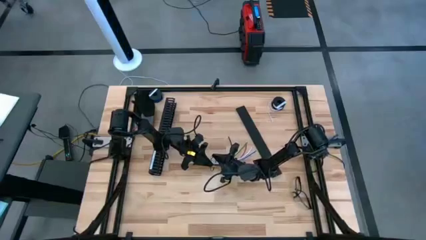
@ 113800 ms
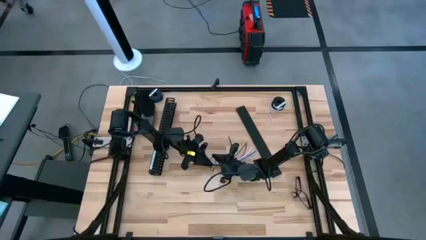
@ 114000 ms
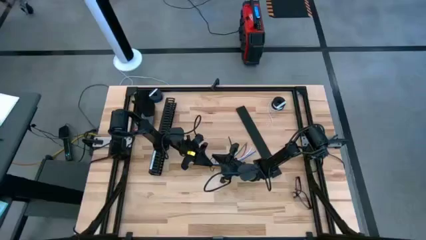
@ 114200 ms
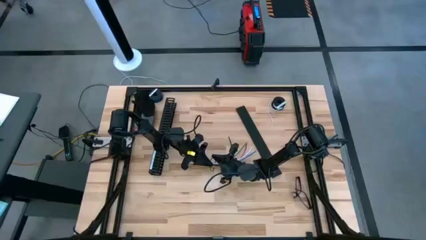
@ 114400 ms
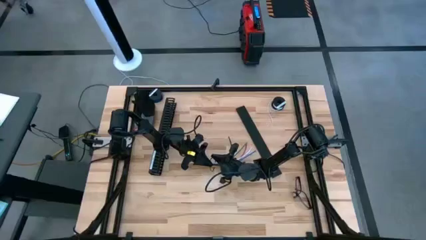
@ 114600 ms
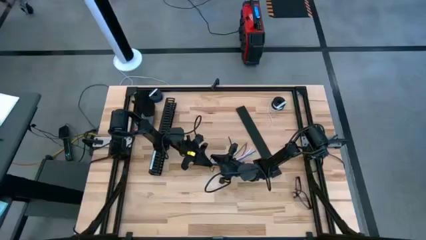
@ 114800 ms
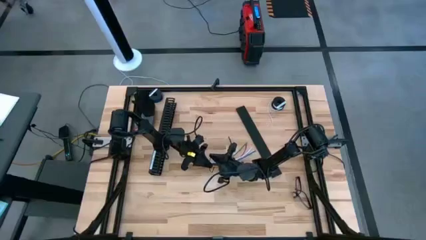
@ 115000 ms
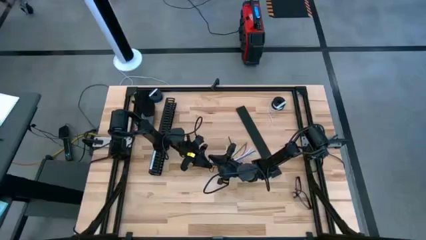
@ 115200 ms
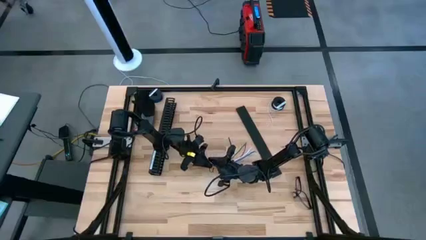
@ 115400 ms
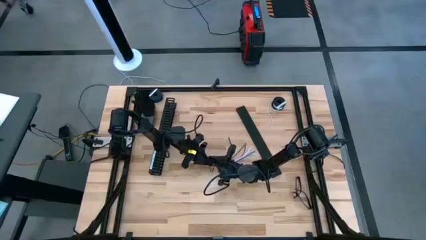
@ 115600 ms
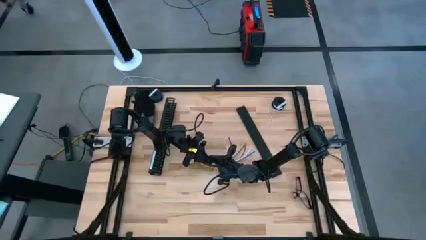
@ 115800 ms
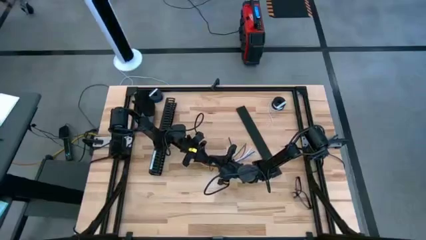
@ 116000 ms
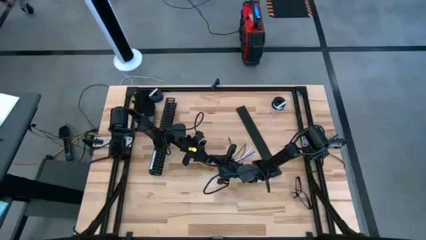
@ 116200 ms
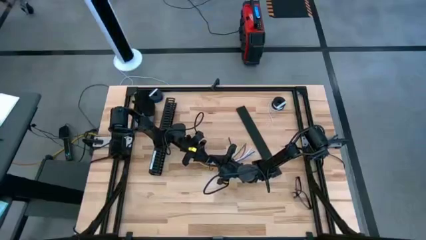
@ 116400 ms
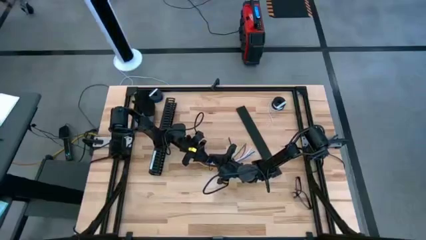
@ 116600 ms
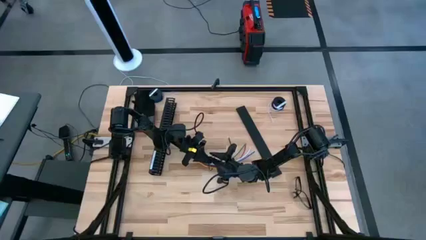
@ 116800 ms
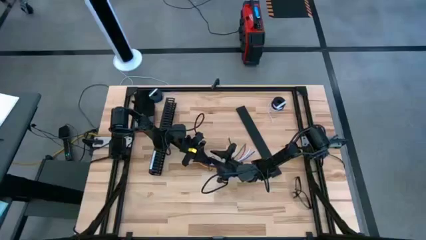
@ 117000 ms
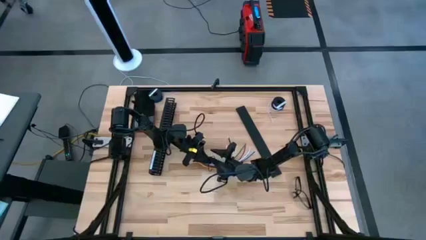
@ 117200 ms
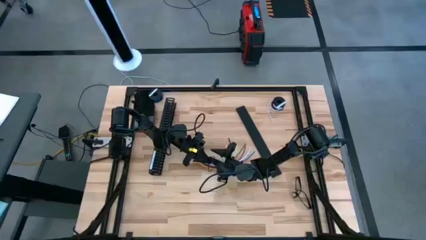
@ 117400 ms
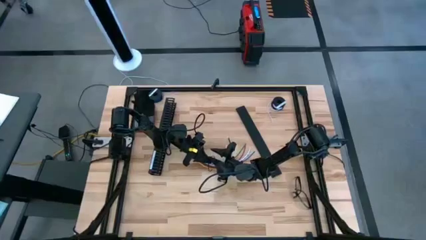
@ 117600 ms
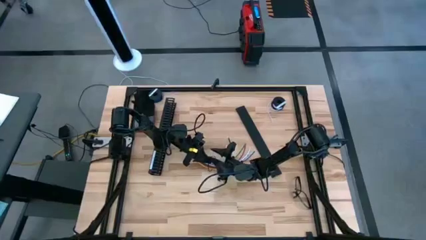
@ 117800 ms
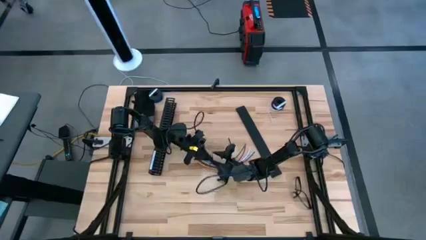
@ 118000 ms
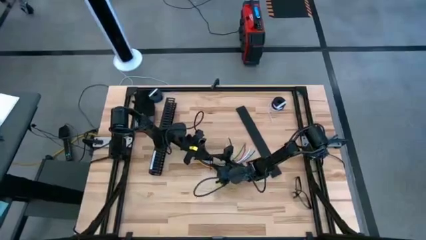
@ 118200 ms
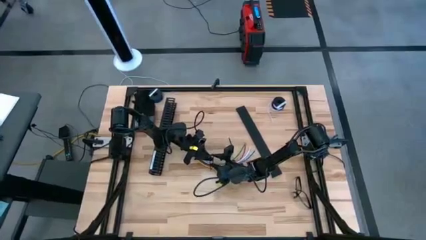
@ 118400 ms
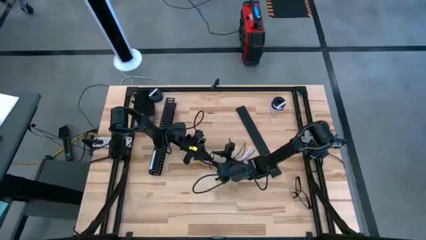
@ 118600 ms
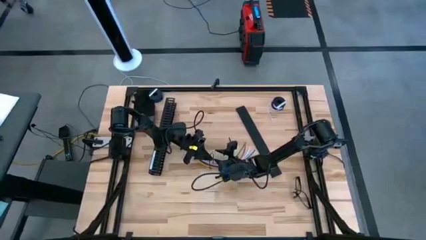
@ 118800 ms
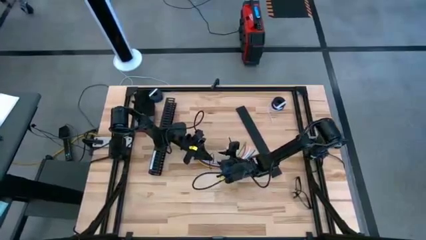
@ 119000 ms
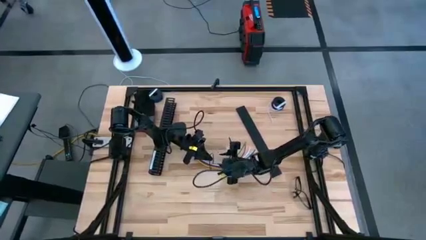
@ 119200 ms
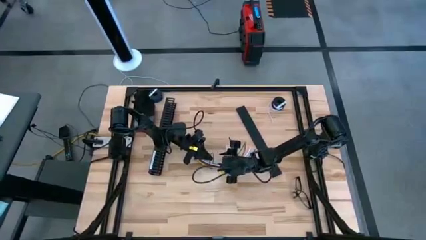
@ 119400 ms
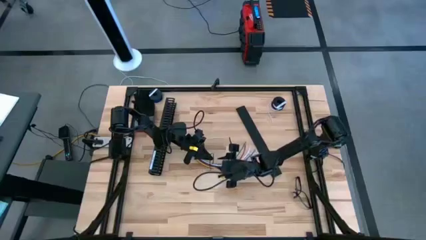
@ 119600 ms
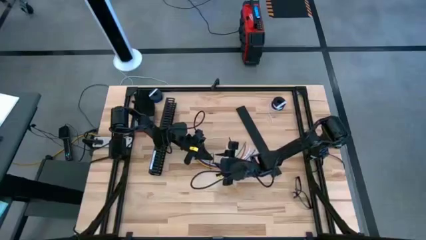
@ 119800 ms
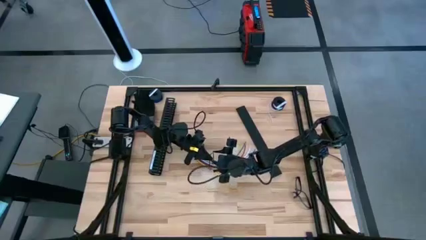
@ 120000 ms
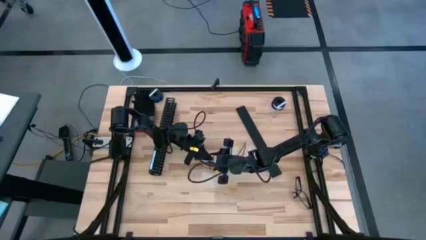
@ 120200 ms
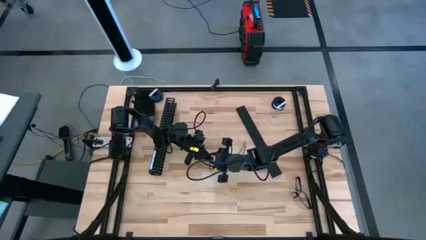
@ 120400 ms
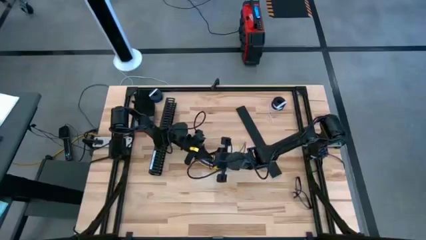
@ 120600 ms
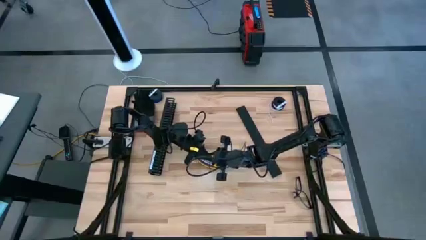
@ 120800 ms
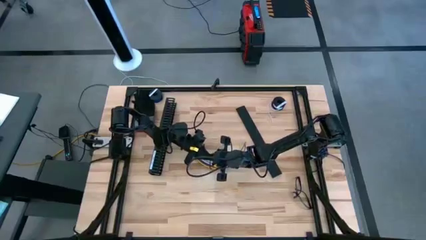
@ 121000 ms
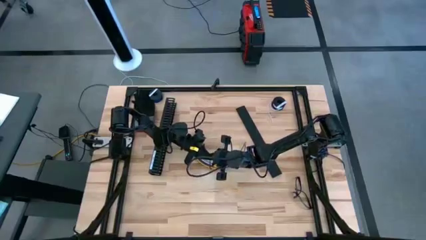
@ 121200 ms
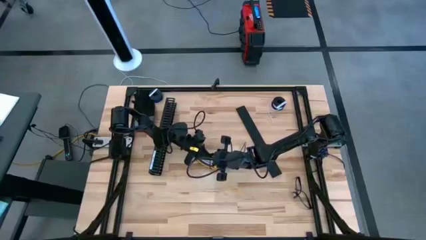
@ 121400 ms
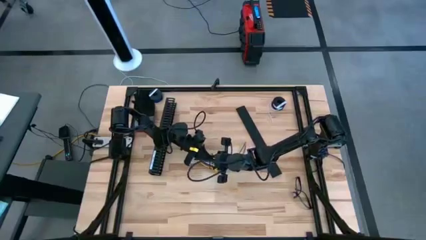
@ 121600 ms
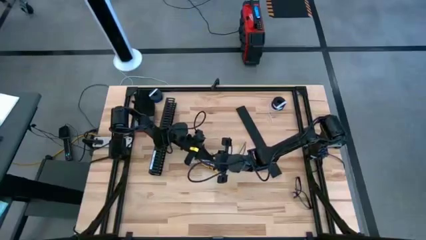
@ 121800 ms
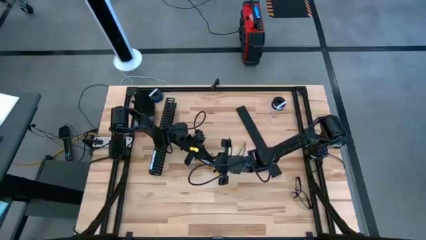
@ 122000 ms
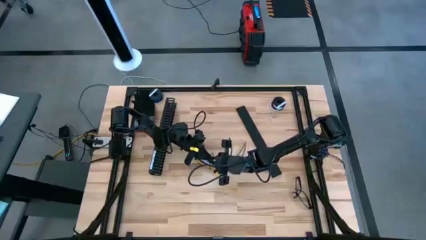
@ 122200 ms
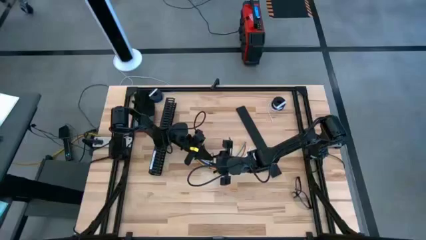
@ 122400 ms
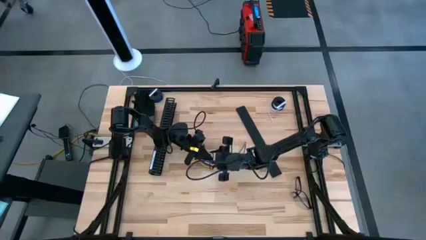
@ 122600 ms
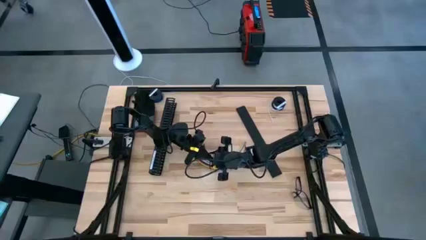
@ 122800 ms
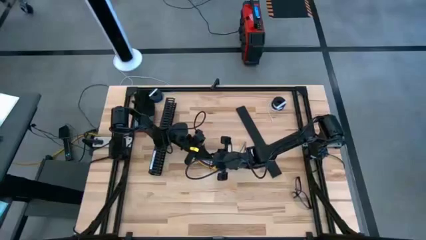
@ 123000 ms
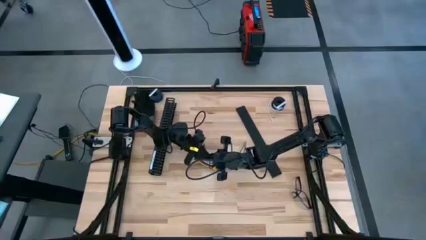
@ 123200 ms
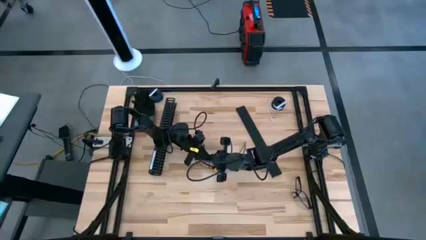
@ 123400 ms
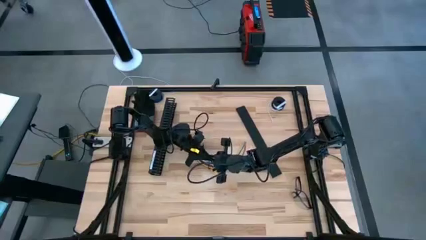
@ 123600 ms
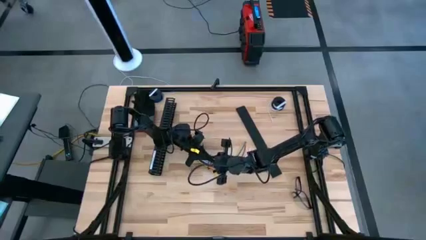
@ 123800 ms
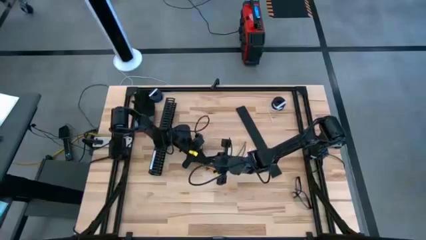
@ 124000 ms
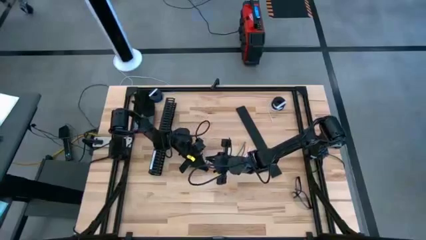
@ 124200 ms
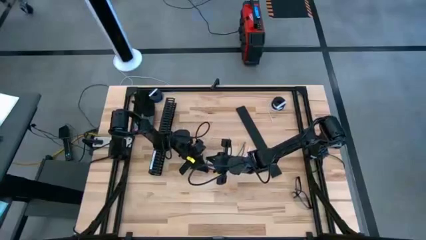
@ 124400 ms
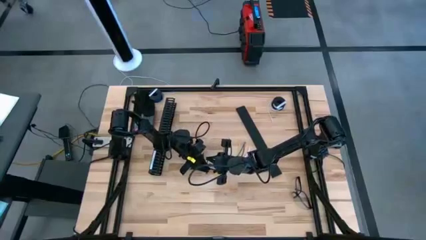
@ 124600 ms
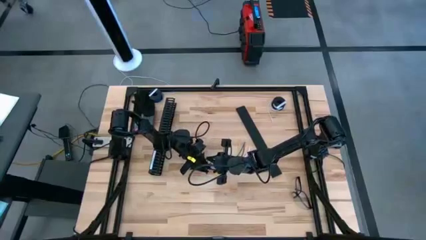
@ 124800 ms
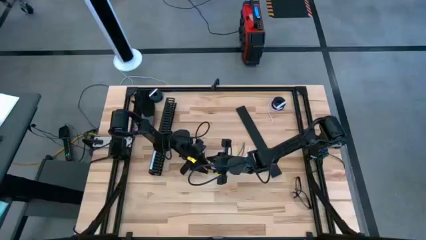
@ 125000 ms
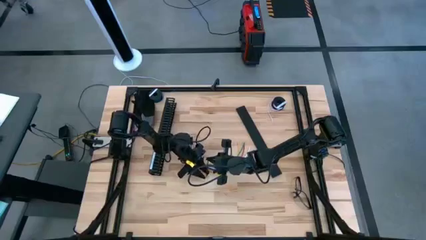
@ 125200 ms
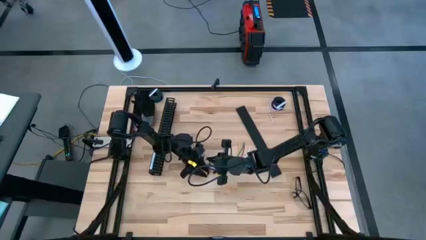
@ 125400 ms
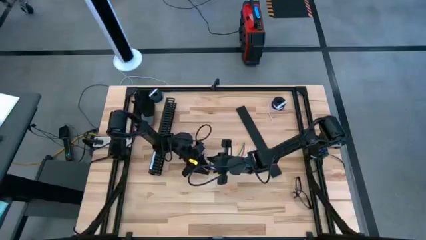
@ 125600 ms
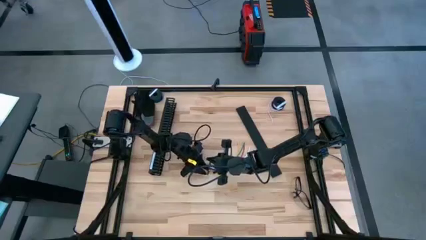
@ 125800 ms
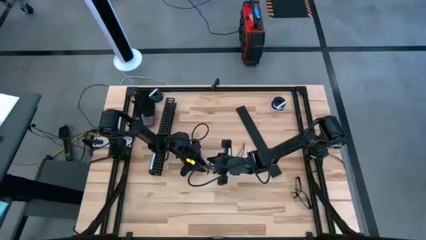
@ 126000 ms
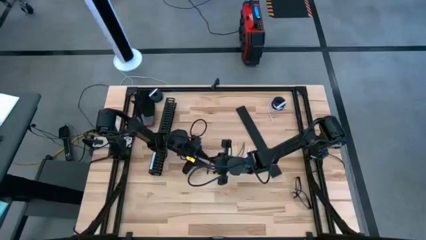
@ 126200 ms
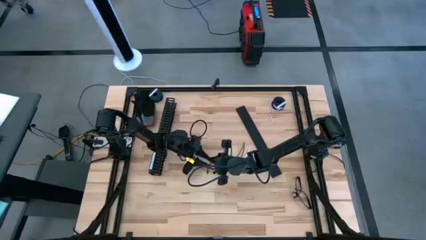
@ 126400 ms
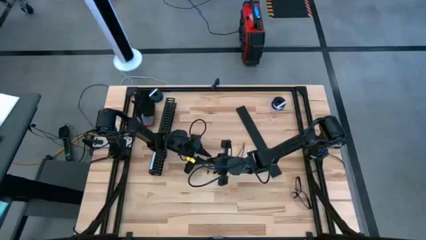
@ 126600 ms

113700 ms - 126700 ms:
Task: Ziptie cables
Wrap the black zip tie on the cable

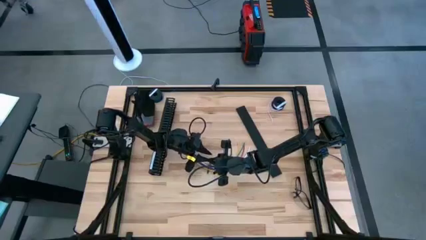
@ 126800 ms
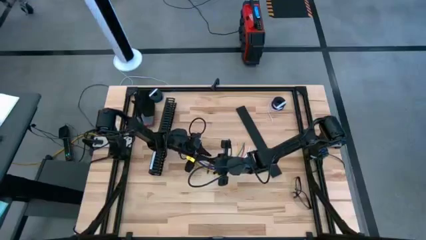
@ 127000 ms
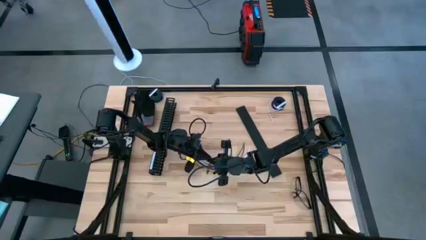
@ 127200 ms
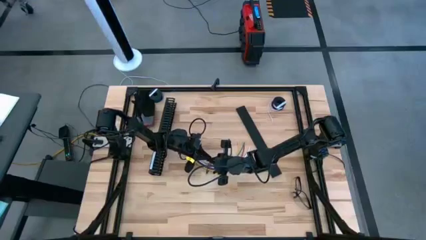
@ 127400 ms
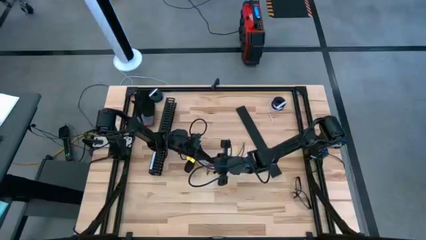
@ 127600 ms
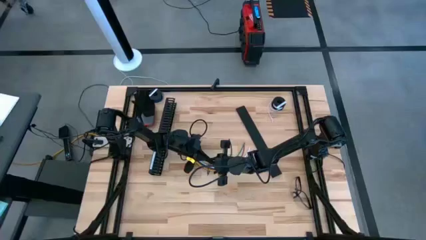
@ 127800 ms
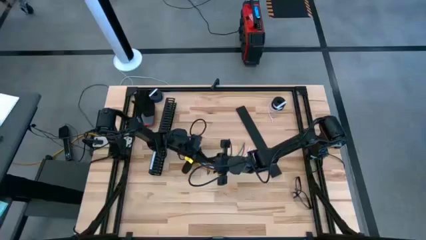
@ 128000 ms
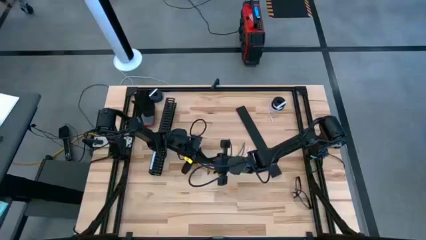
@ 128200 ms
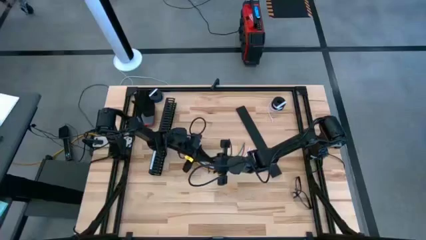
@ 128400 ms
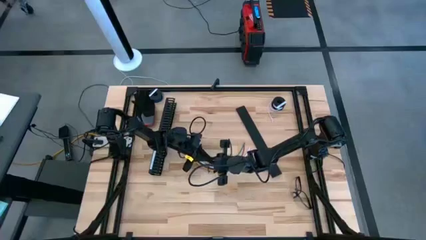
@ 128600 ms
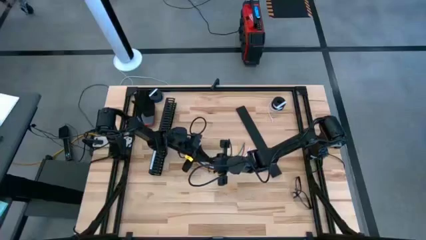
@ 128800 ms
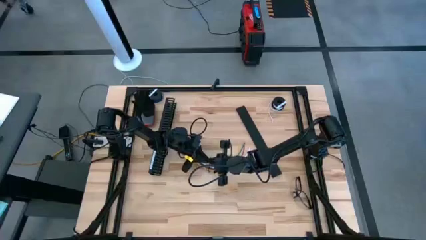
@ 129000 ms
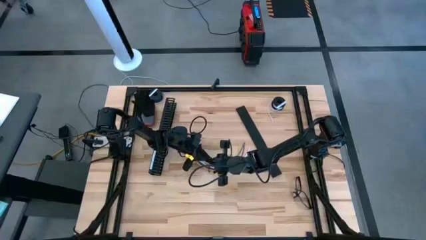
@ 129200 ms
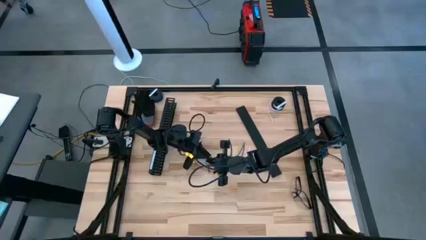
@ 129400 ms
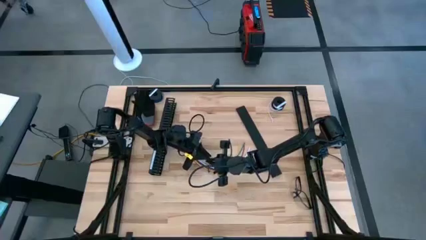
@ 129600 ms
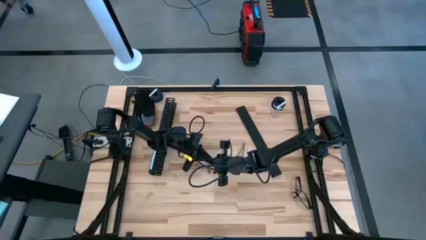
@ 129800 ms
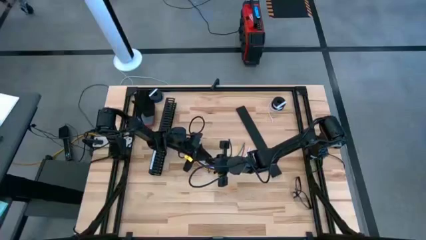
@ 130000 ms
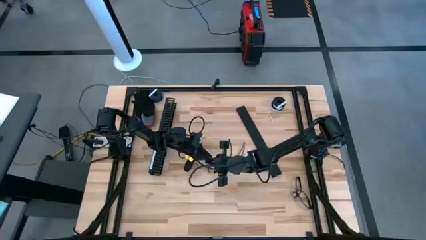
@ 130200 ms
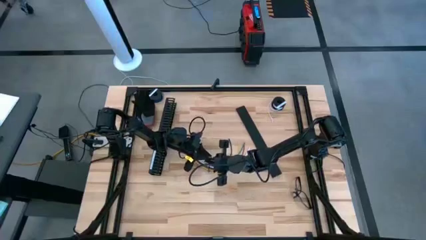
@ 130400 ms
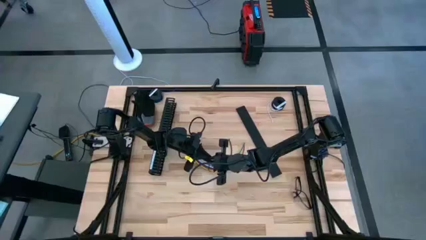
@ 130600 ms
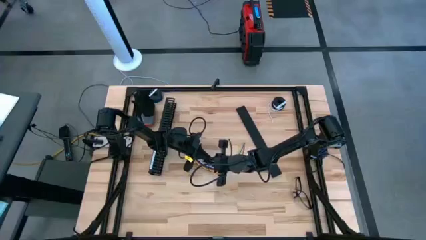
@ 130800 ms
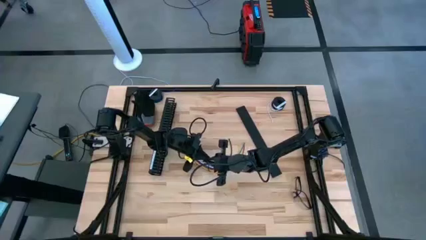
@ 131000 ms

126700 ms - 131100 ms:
Wrap the black zip tie on the cable
